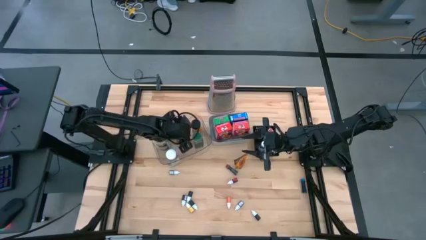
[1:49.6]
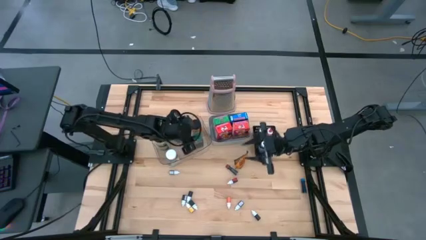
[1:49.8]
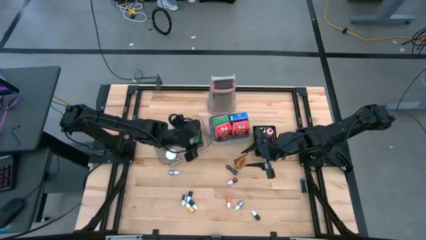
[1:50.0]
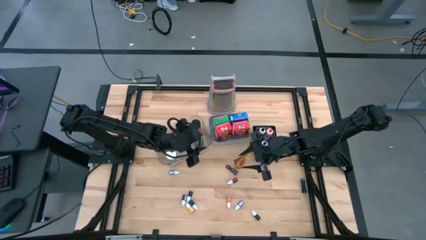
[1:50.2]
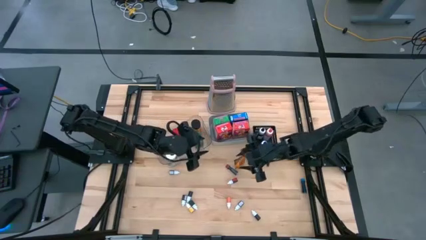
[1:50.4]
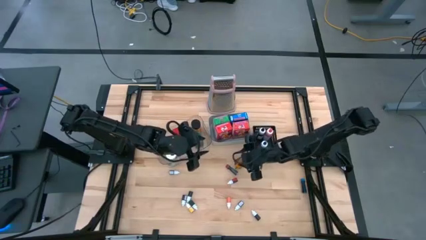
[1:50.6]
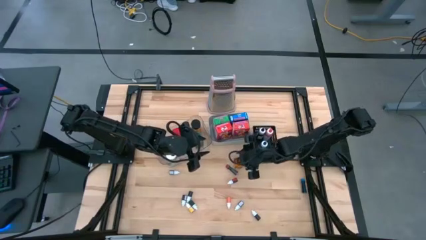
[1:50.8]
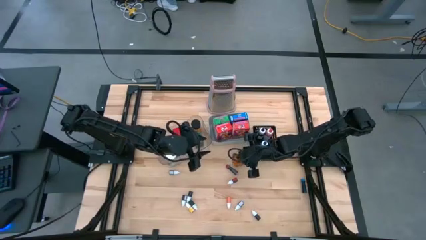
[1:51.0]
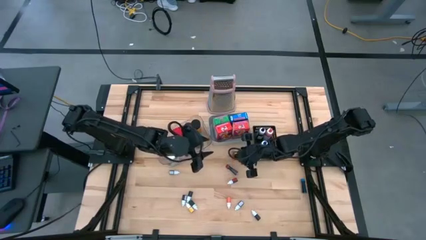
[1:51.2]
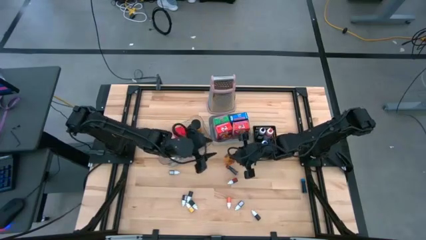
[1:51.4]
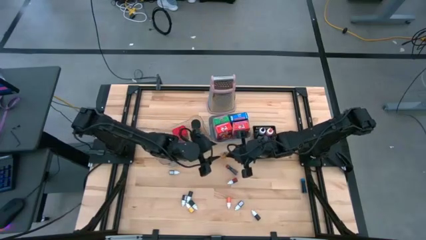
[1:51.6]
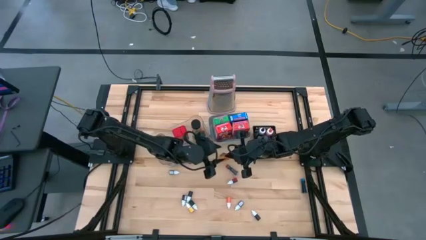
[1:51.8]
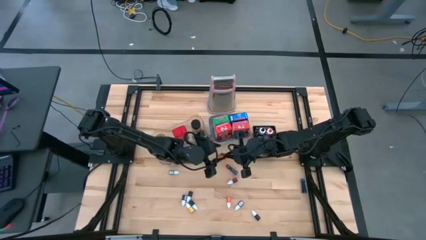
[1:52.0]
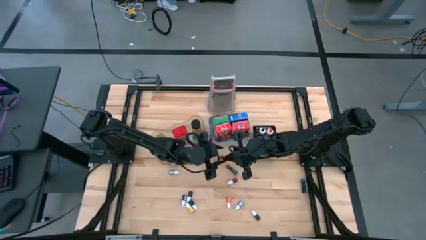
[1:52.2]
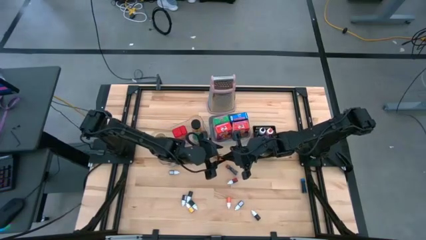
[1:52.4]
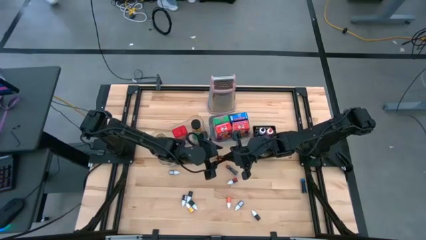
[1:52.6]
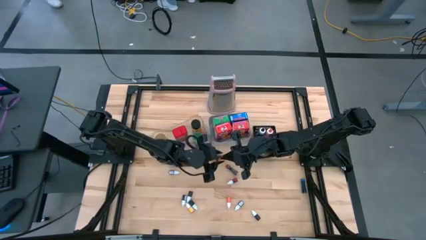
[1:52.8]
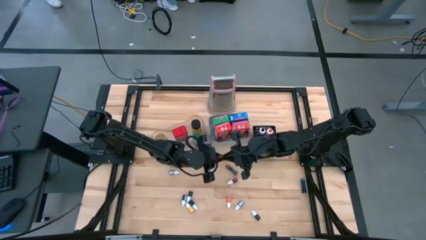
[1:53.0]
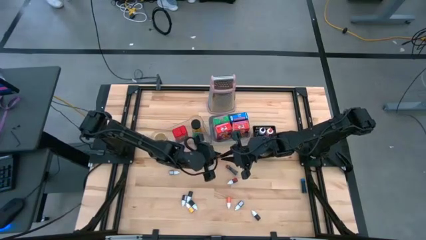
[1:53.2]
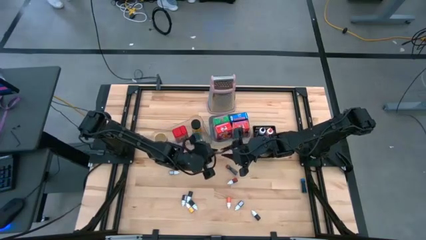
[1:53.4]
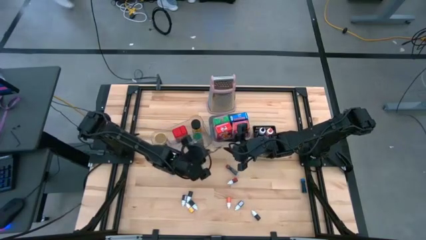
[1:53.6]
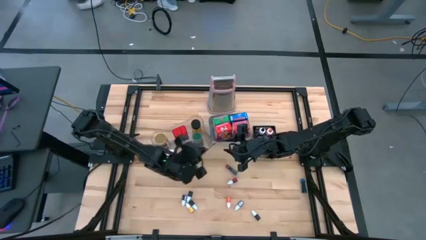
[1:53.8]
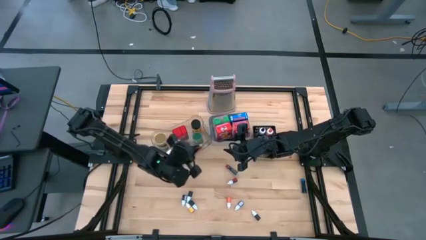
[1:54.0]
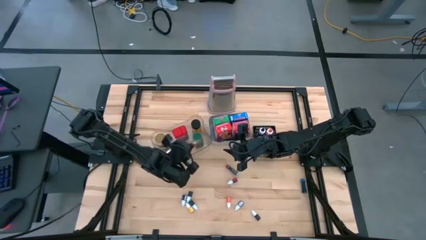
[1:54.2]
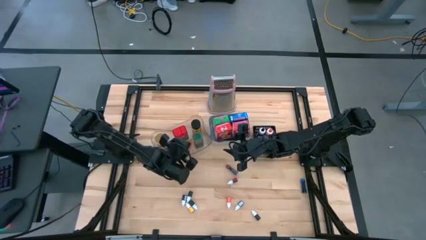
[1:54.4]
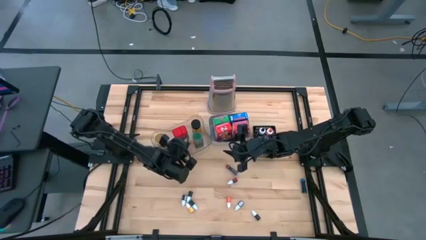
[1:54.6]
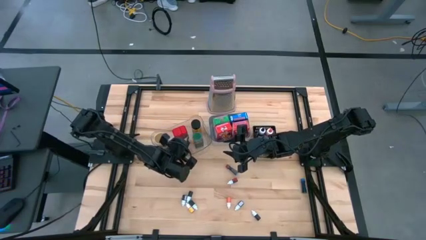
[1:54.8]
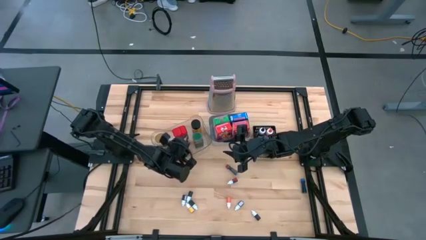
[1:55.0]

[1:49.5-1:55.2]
Task: Pick & Place Kitchen Items
Put the orange seasoning pack into the transparent bin

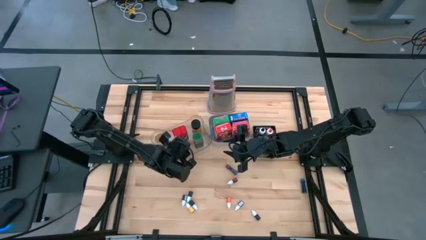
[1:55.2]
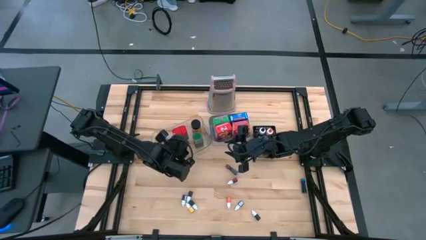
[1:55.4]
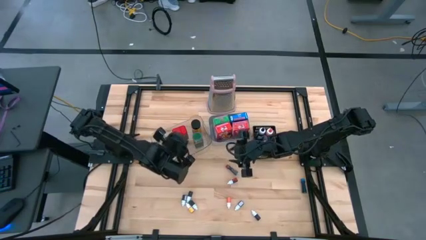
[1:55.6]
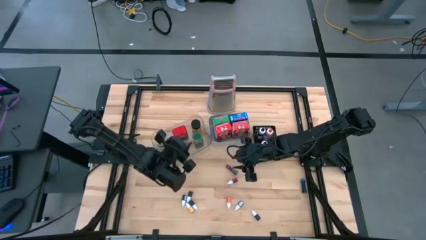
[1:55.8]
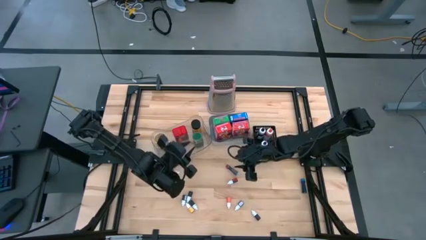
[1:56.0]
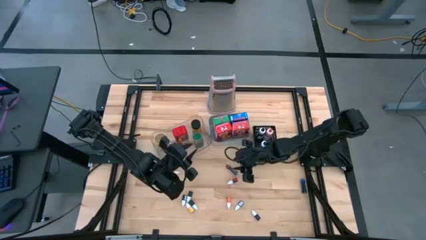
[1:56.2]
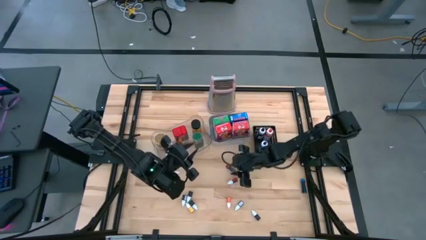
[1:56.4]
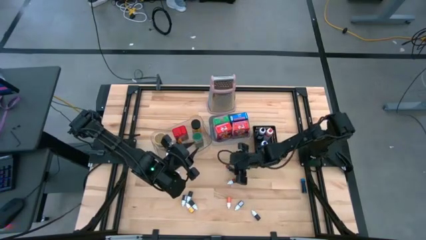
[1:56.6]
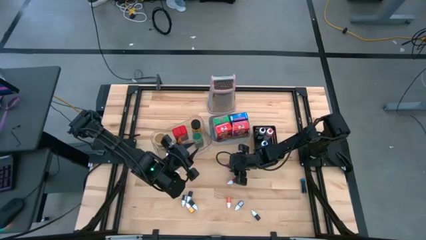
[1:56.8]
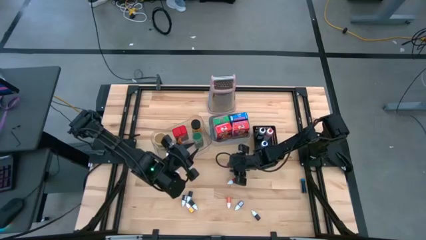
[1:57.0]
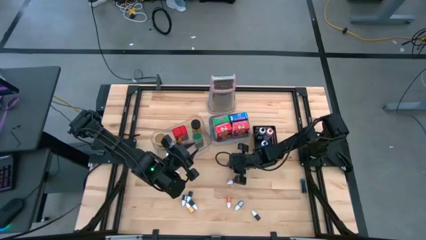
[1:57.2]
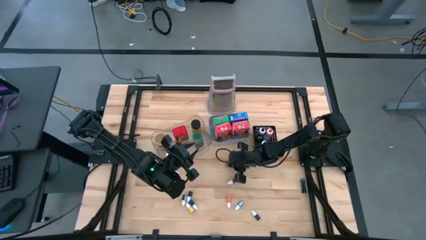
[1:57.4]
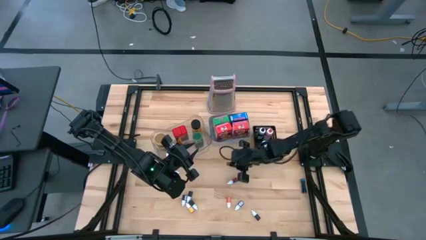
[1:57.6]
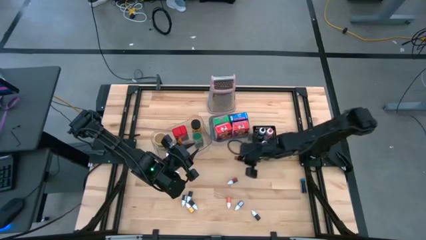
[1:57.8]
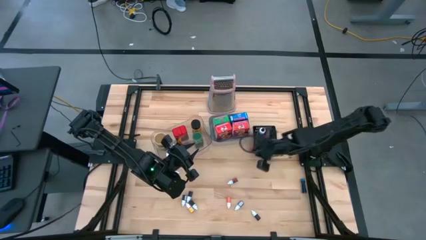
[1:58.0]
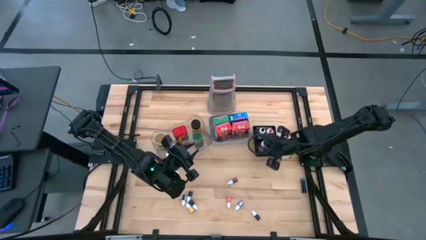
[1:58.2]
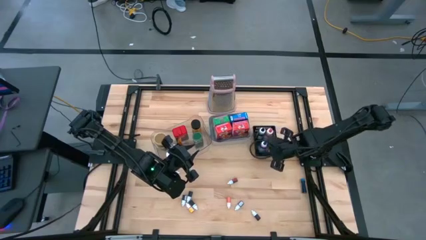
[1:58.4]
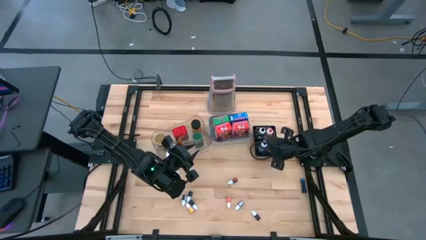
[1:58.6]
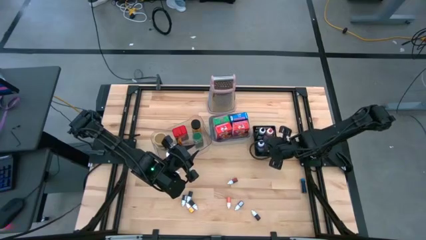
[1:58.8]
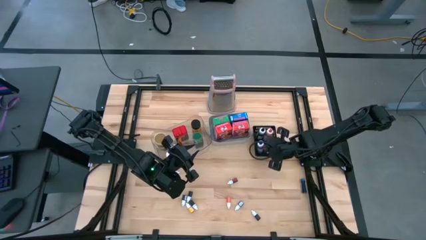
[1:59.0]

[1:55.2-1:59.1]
Put the top small red food coloring bottle into the black basket

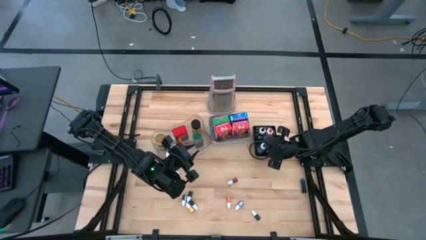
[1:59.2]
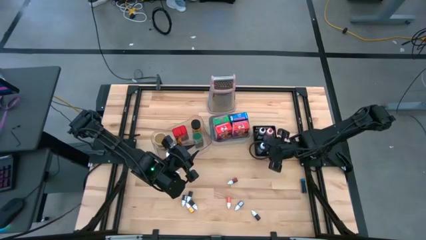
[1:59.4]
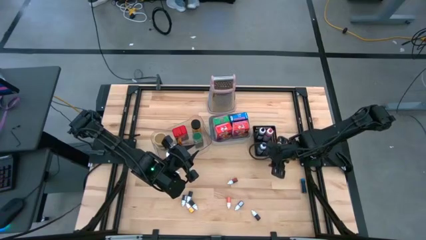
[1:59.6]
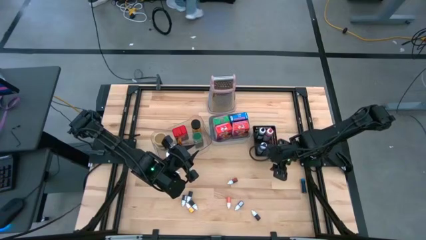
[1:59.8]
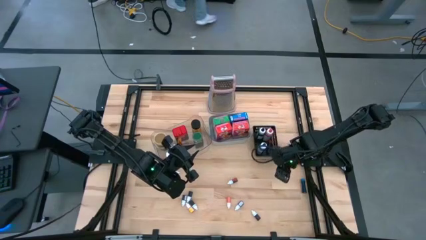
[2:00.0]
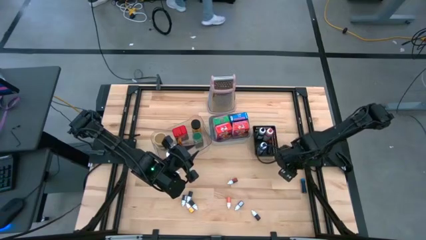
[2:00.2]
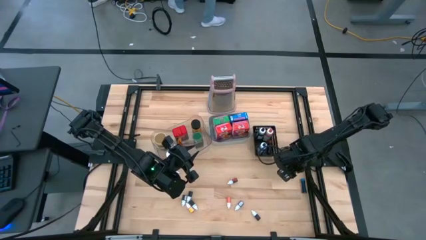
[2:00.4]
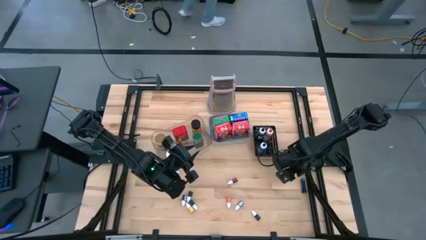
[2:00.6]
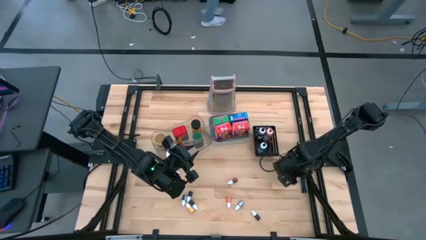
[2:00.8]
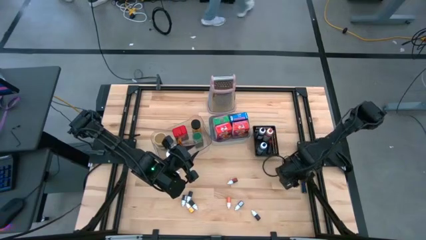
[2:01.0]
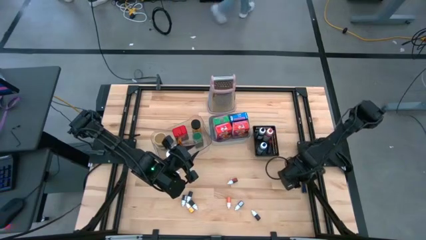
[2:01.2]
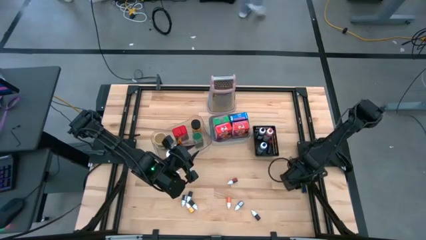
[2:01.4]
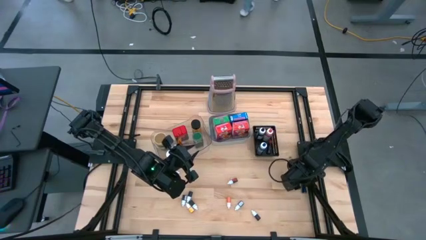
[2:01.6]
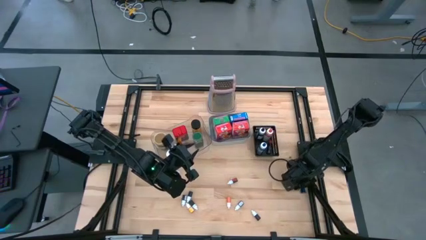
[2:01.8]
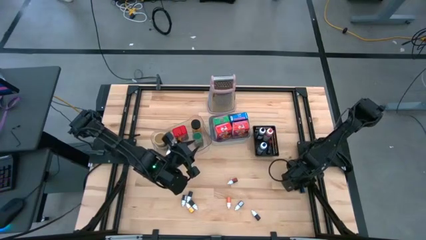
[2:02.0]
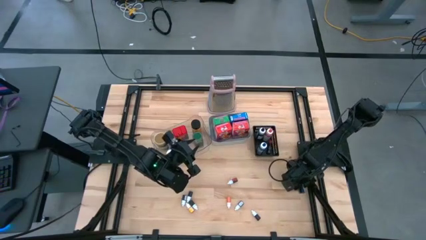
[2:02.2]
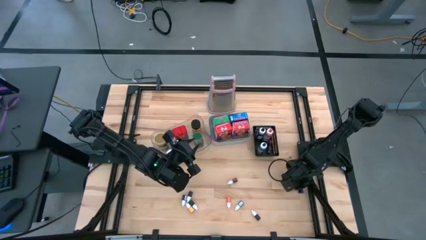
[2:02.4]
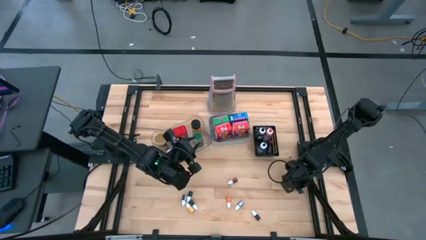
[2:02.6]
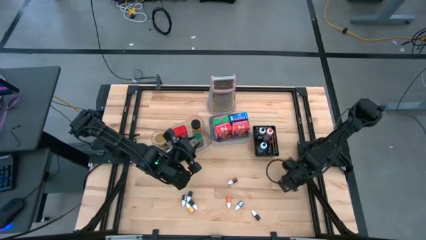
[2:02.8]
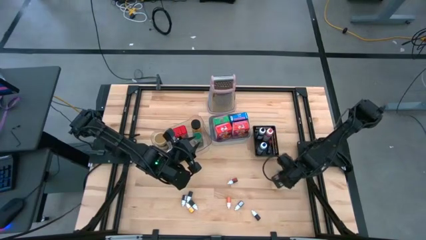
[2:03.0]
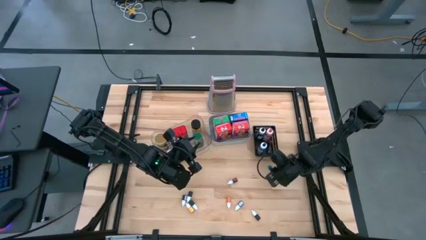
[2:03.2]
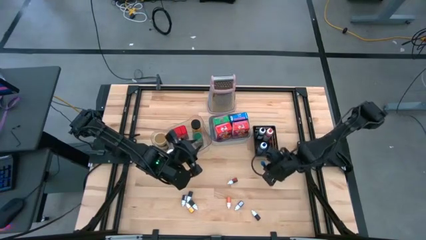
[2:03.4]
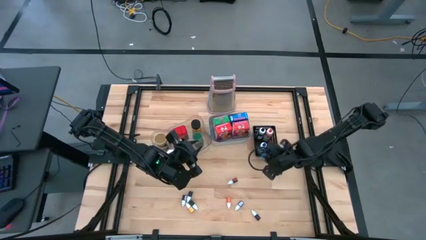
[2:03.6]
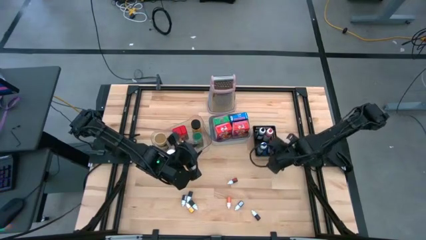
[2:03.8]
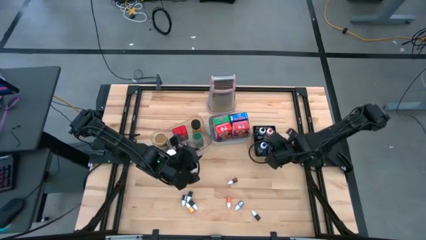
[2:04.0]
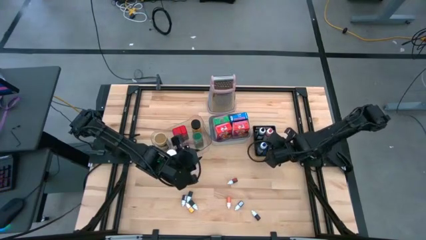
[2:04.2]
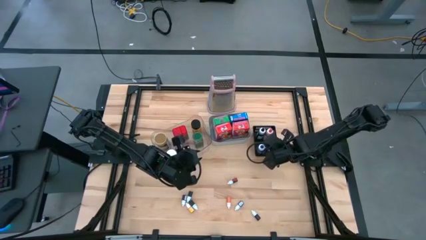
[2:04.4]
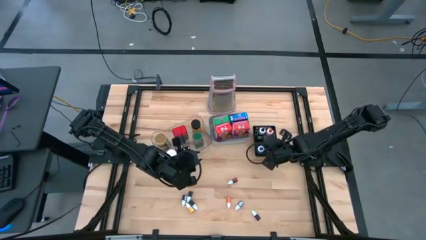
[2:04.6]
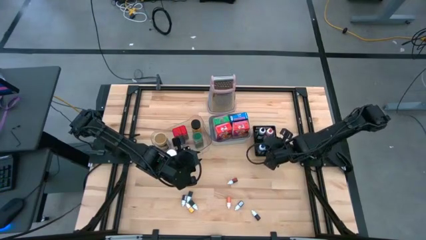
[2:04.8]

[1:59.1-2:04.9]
Put the small blue food coloring bottle into the black basket
